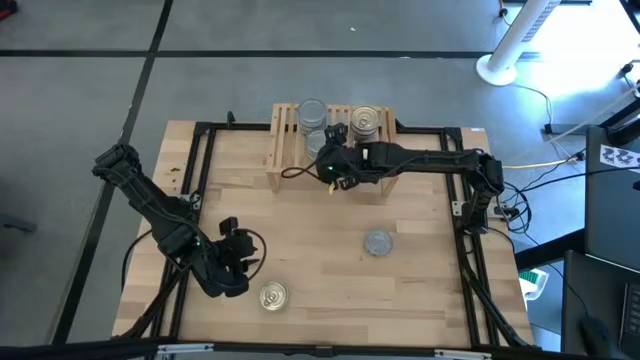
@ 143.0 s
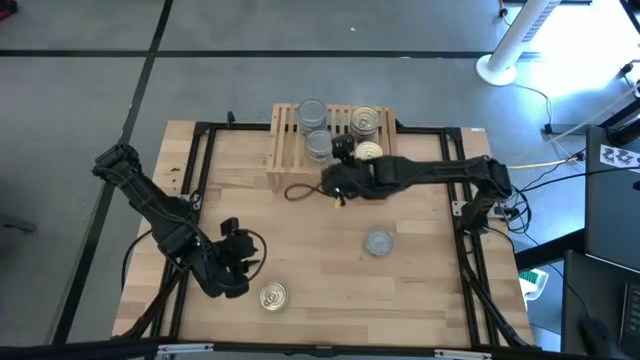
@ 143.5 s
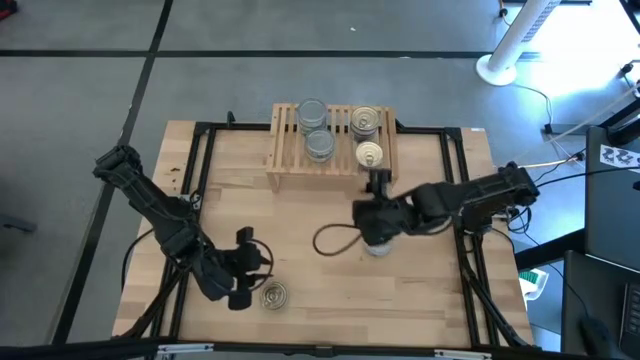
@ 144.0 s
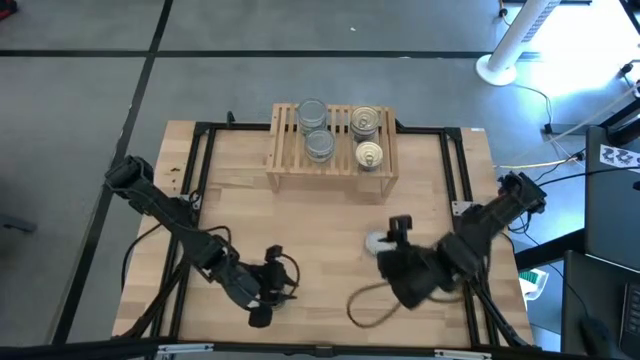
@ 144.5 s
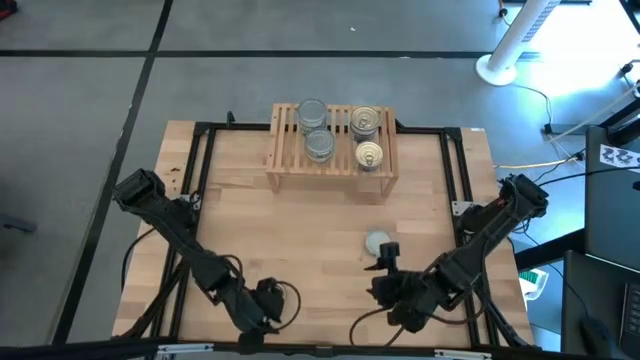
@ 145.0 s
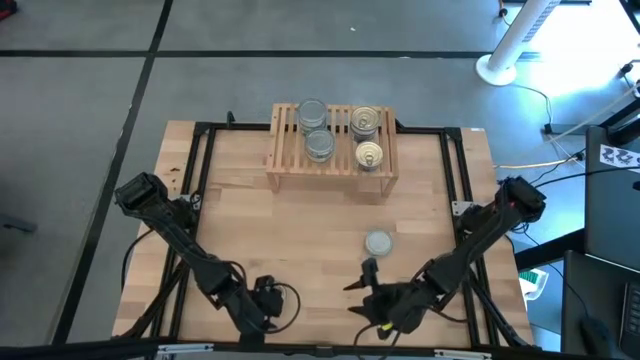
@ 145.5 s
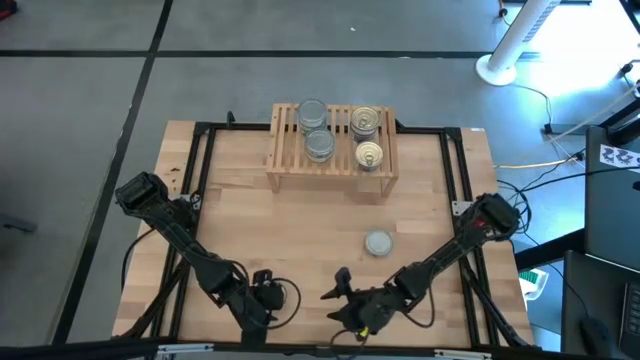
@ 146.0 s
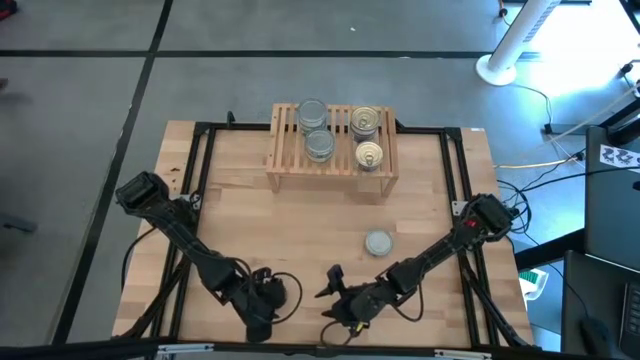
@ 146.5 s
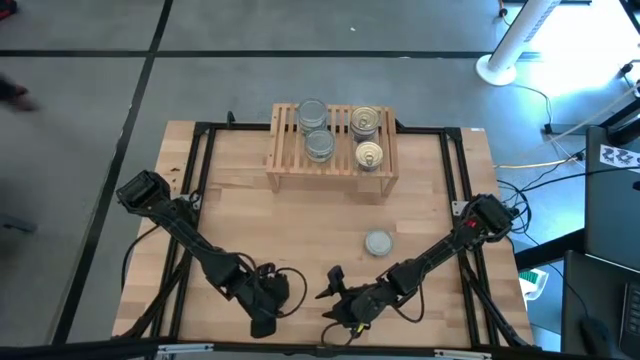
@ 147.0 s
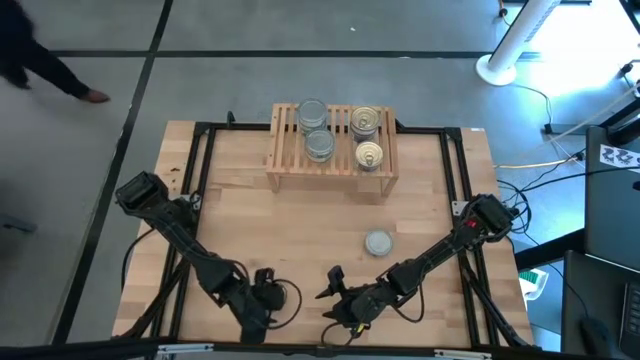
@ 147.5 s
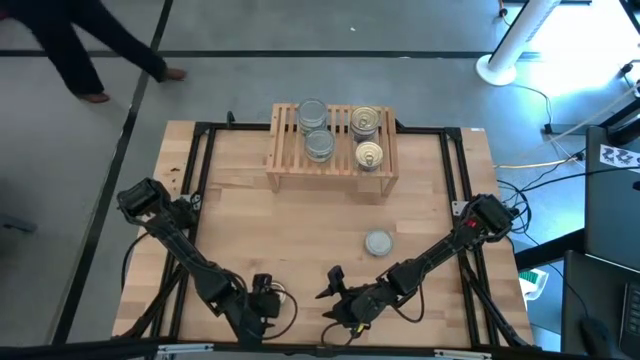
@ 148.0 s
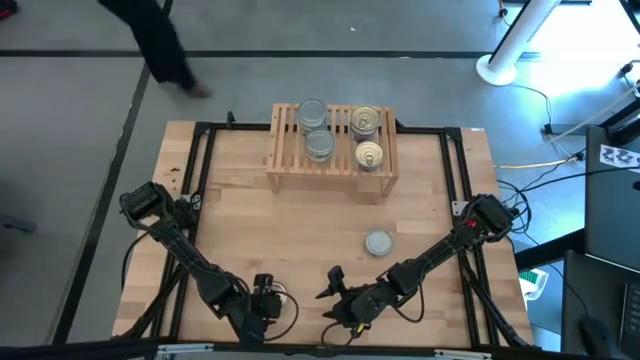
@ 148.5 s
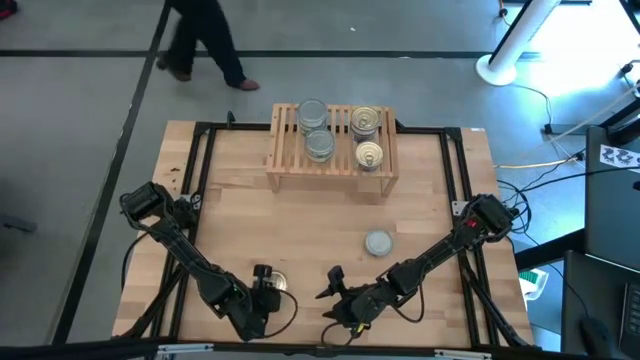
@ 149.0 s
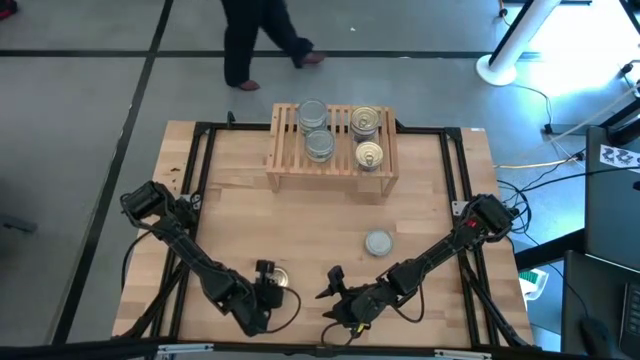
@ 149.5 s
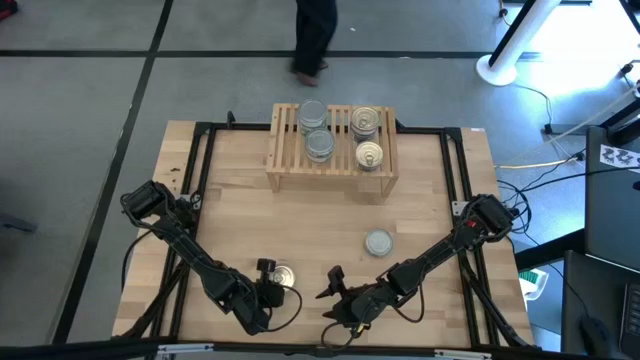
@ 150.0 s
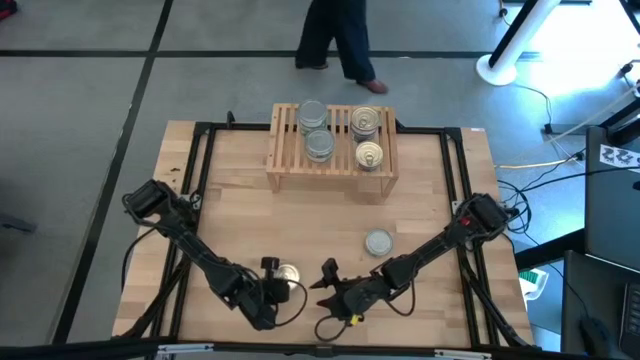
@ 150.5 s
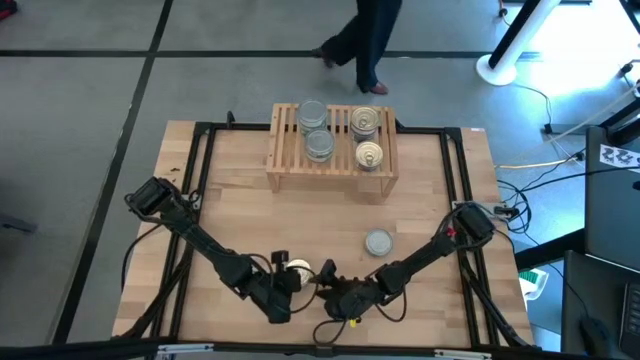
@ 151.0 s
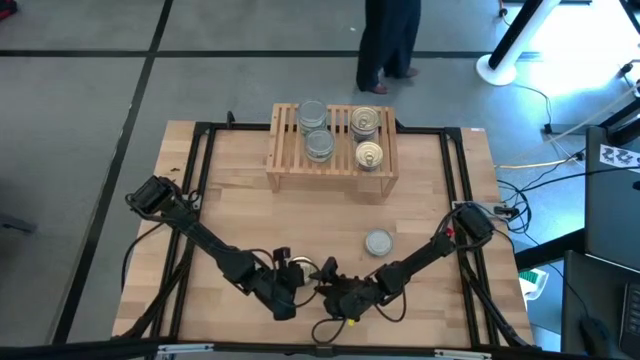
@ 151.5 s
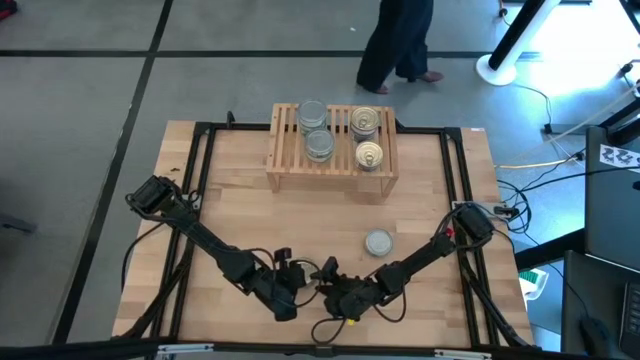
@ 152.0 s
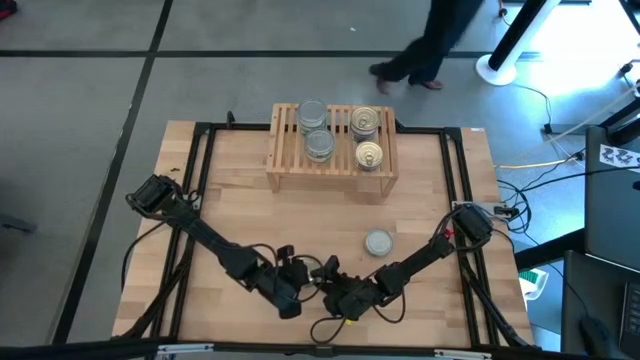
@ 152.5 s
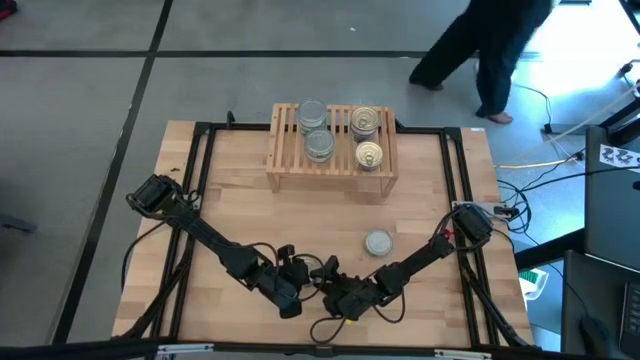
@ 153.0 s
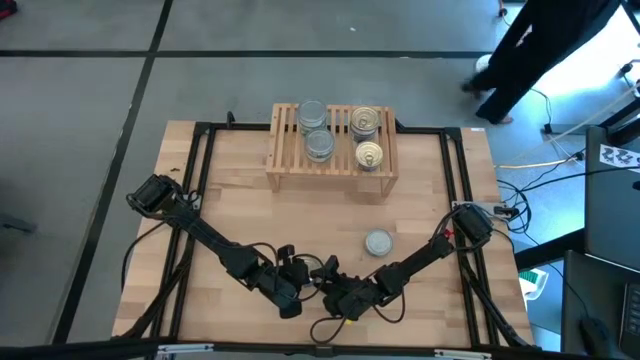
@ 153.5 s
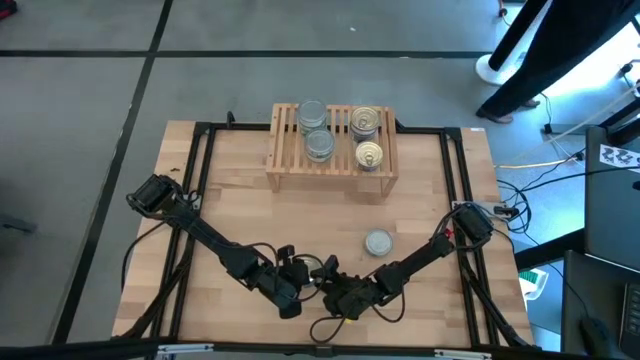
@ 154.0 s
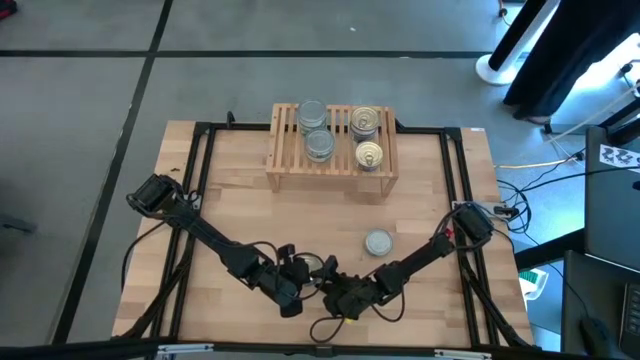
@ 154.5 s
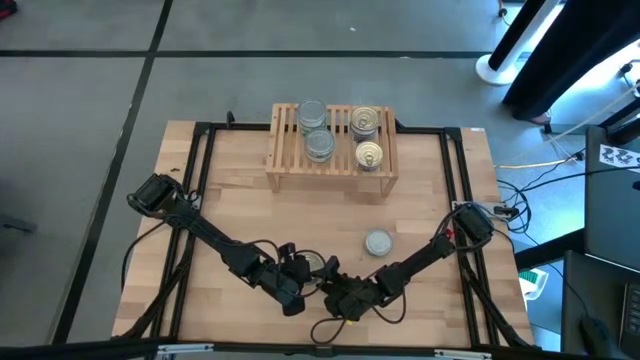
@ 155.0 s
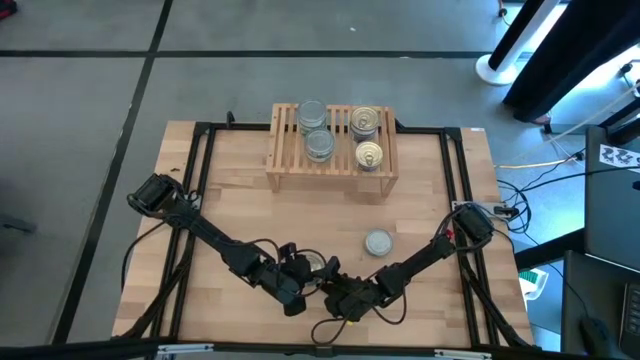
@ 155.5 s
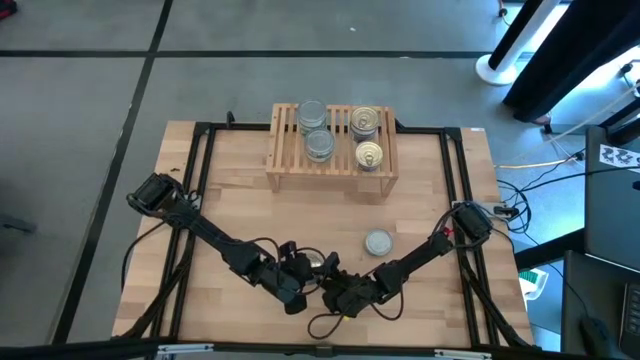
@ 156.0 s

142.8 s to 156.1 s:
Task: Stack canned seafood by type on shelf
Stack the blue pink tuna can on top of the blue pink tuna can on the shelf

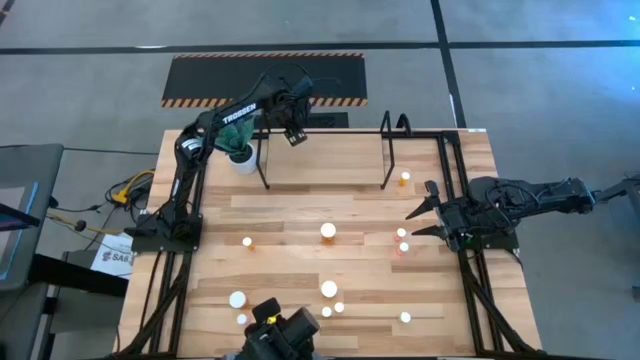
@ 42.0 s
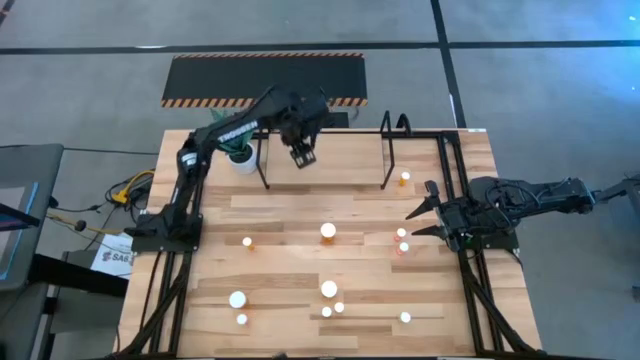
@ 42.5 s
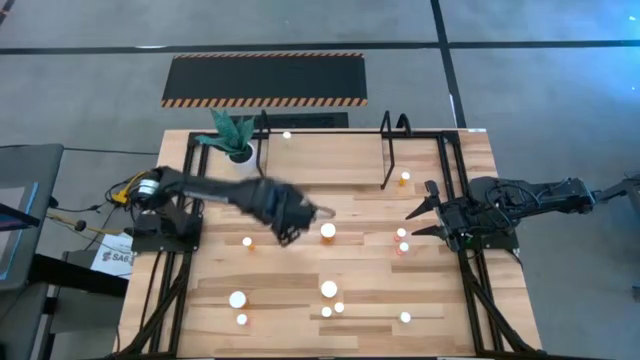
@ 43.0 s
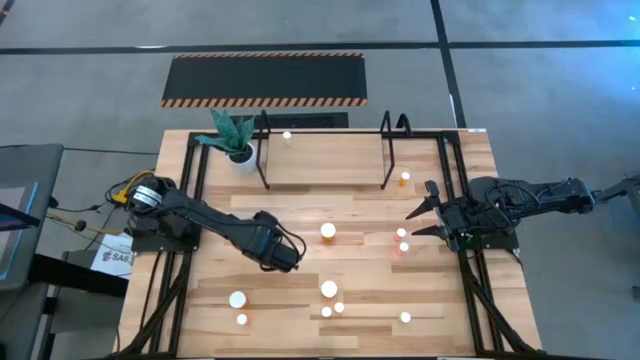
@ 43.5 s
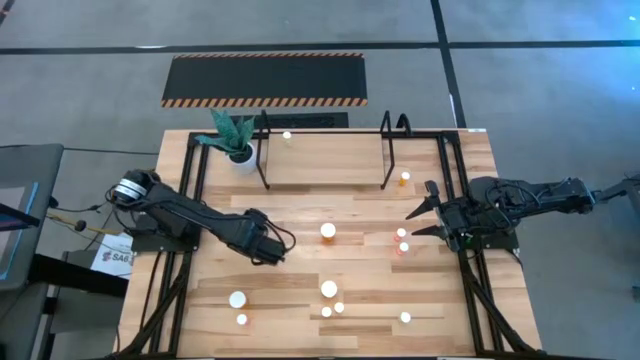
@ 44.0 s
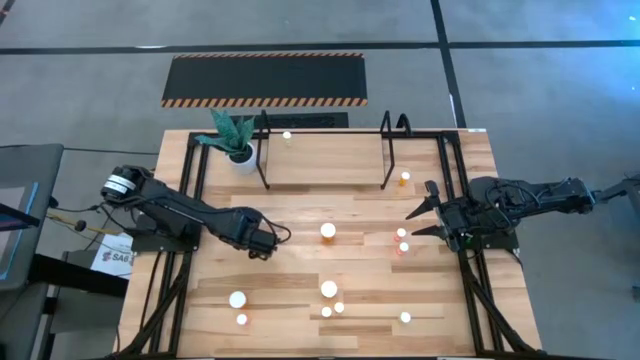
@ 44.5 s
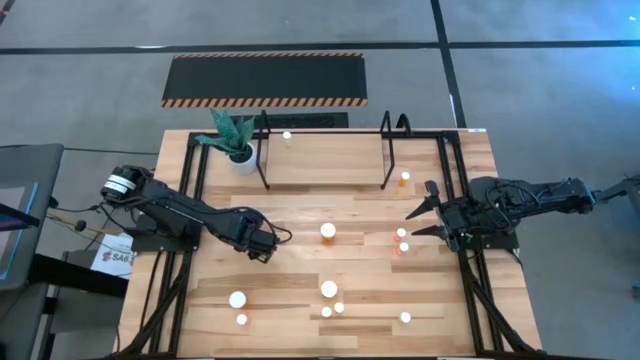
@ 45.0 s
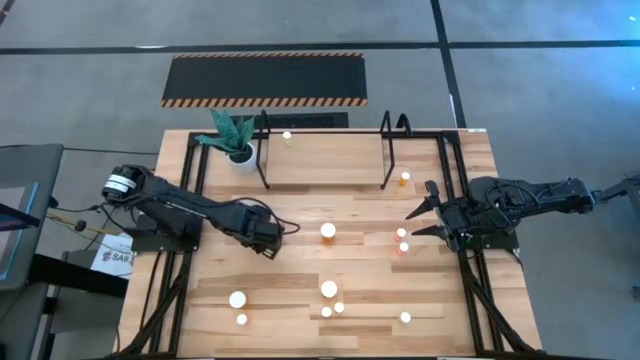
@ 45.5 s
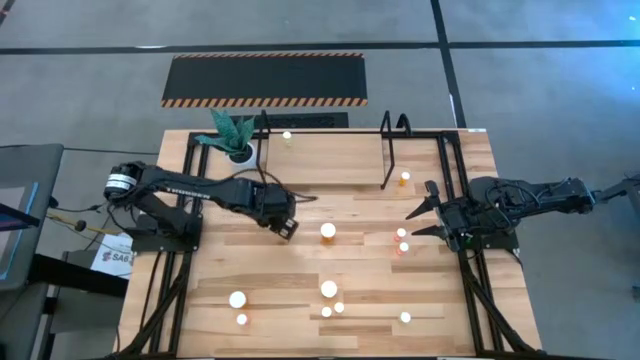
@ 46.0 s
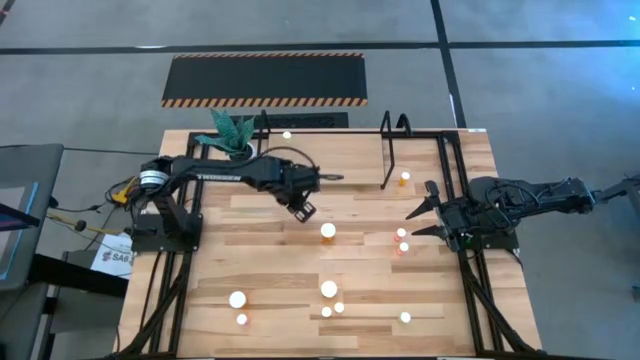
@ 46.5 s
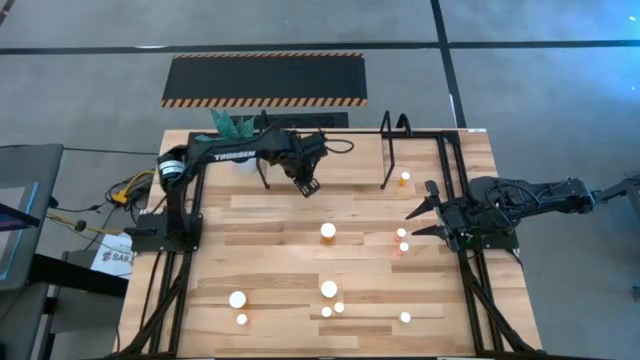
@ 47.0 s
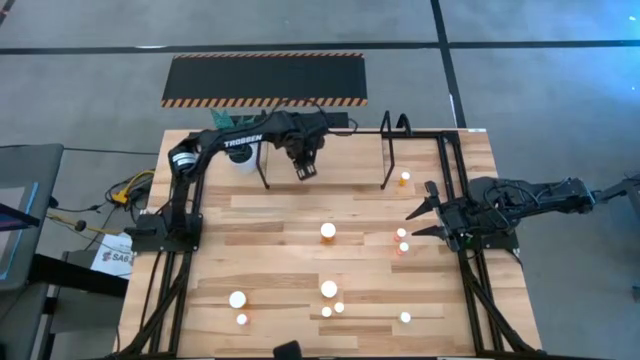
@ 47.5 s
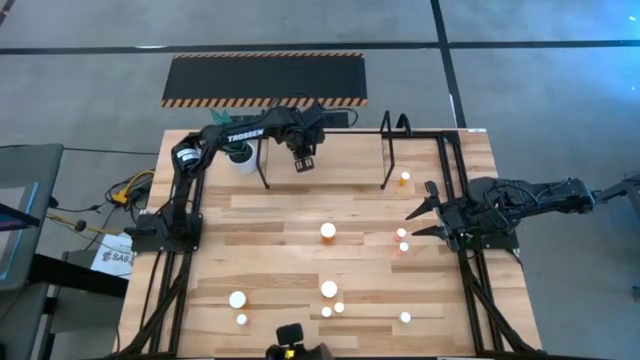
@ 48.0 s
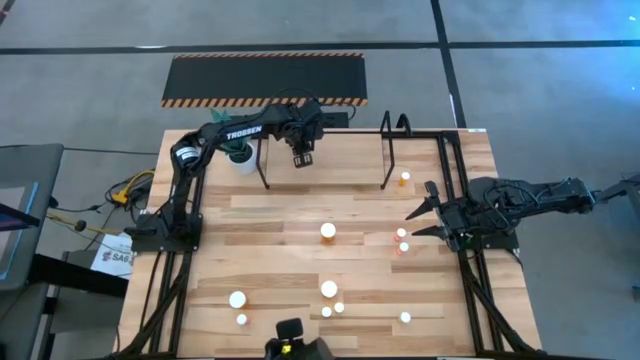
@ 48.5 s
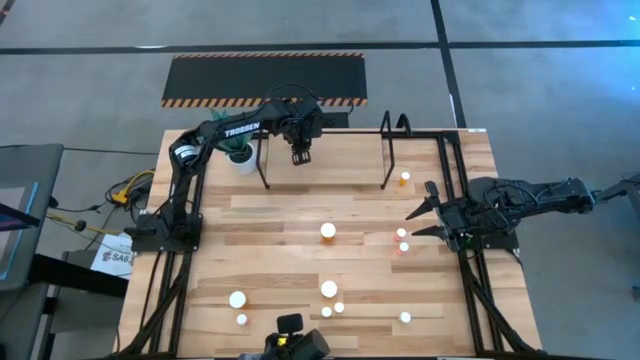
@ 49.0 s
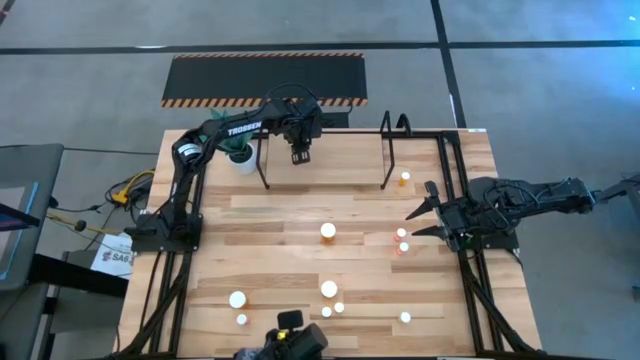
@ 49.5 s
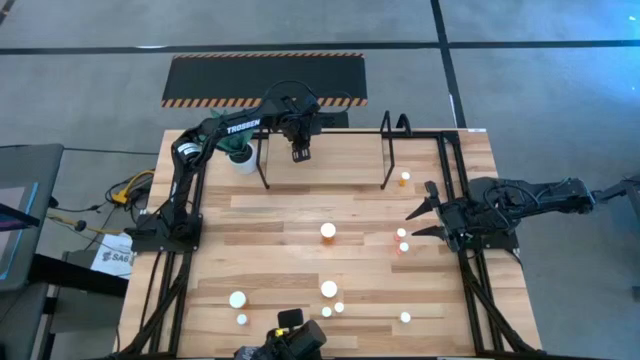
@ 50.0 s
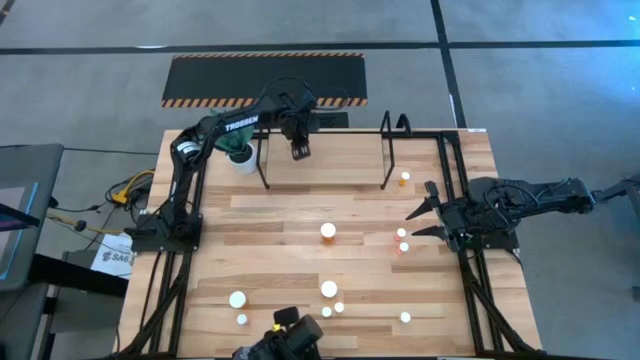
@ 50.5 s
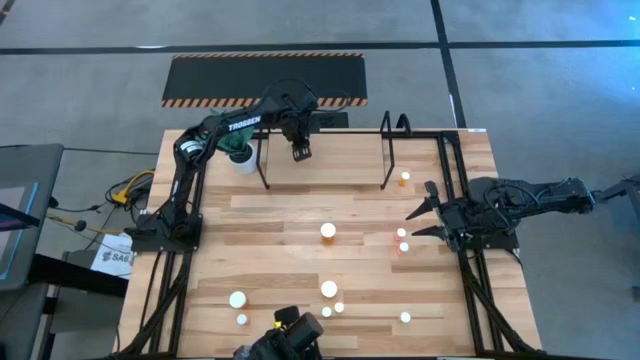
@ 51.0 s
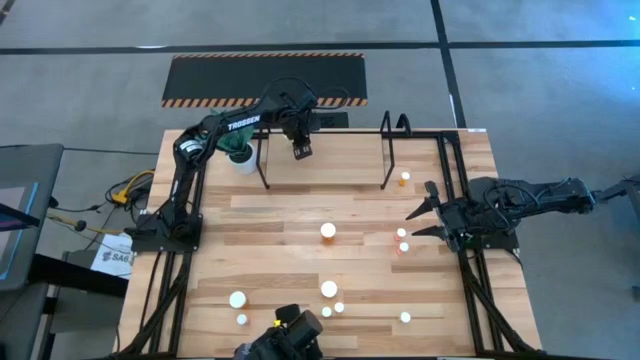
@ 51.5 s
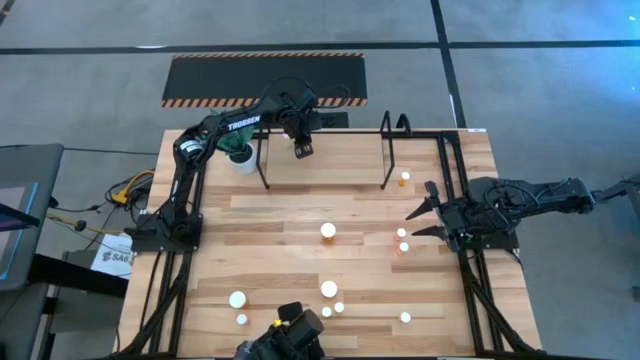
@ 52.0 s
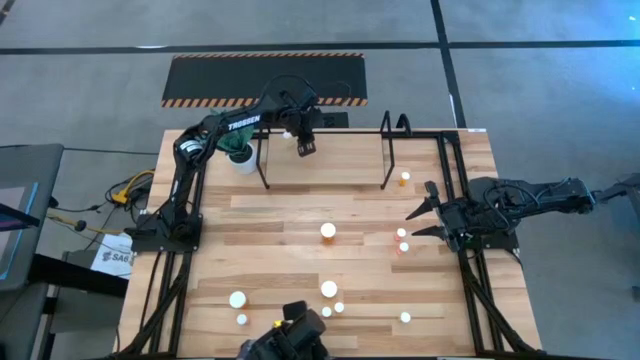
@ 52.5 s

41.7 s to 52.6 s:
Task: Pick and place medicine bottles onto shelf by color
Put the middle left small orange pill bottle on the shelf
